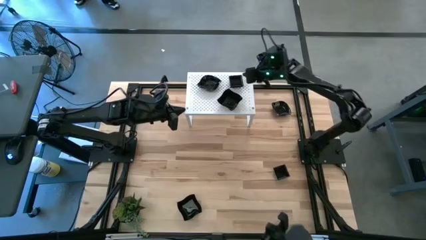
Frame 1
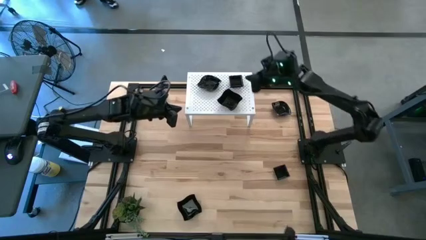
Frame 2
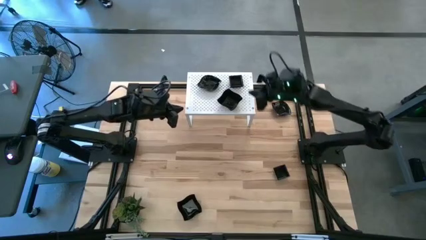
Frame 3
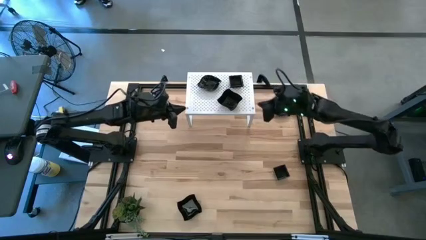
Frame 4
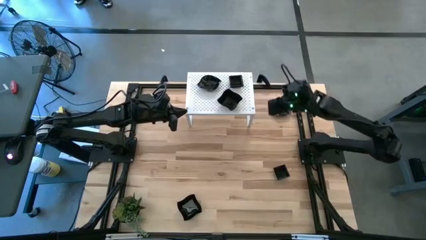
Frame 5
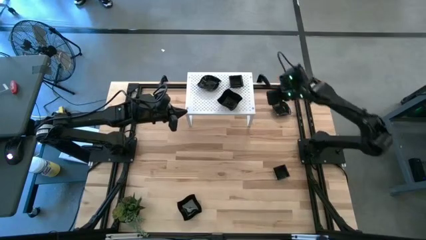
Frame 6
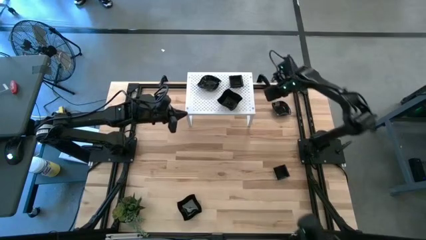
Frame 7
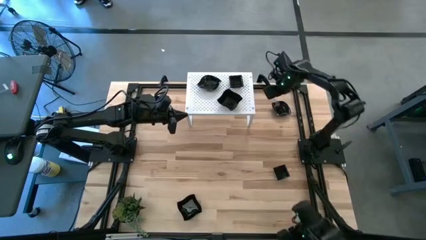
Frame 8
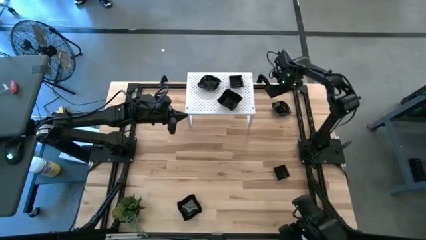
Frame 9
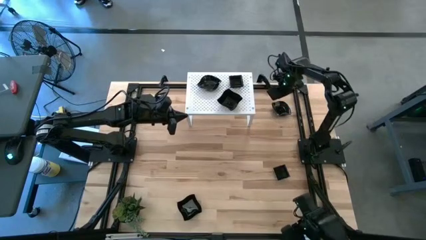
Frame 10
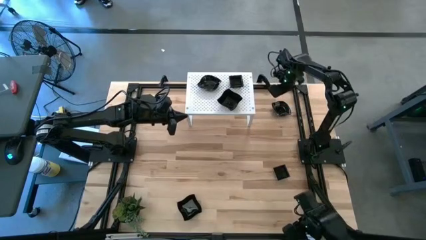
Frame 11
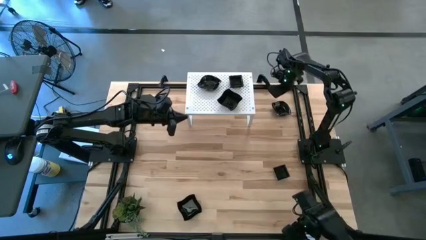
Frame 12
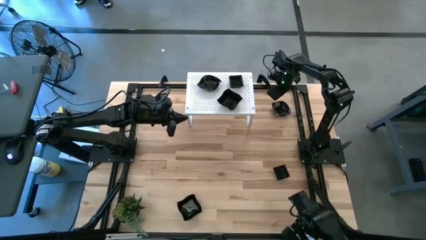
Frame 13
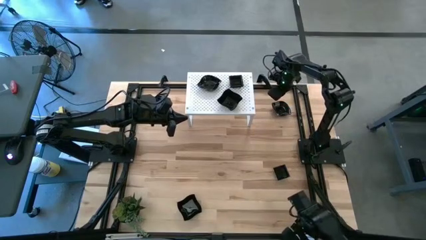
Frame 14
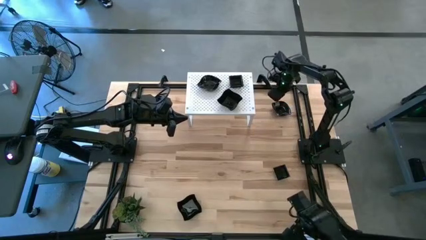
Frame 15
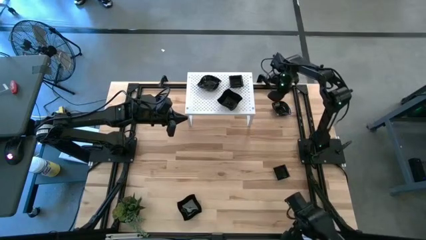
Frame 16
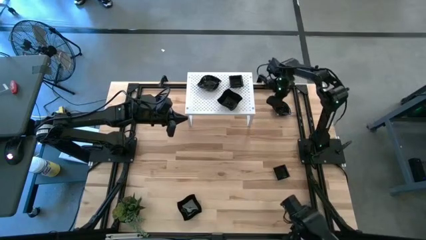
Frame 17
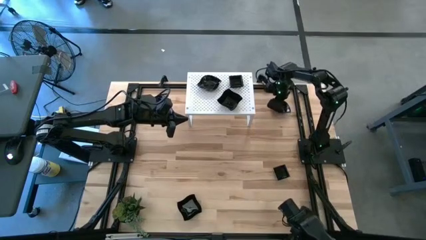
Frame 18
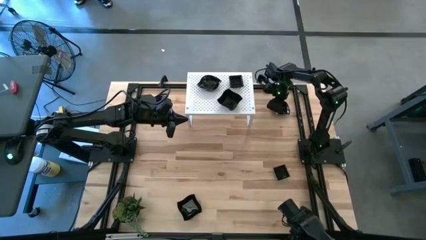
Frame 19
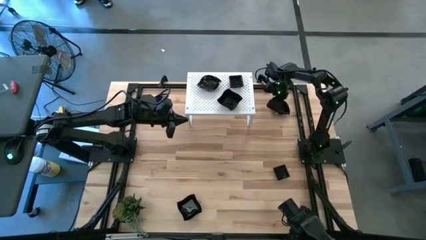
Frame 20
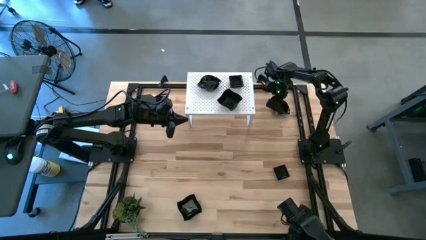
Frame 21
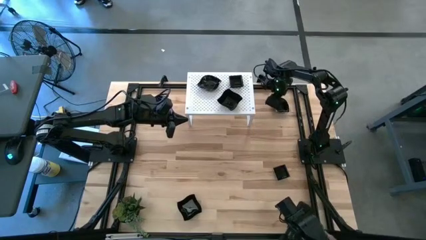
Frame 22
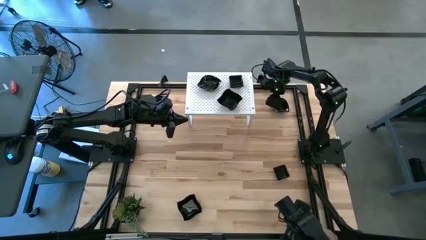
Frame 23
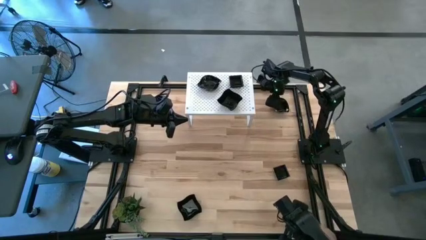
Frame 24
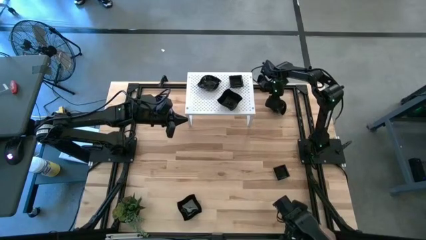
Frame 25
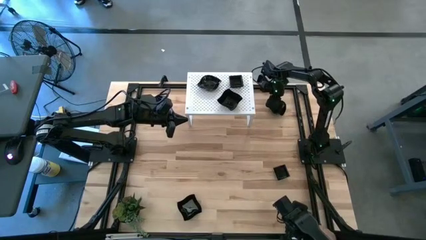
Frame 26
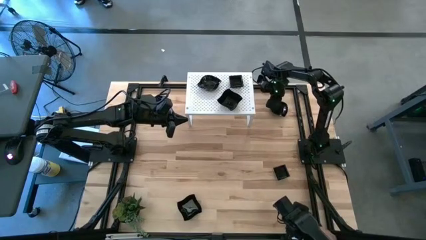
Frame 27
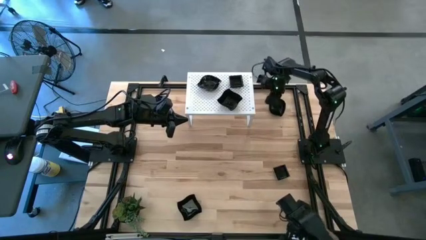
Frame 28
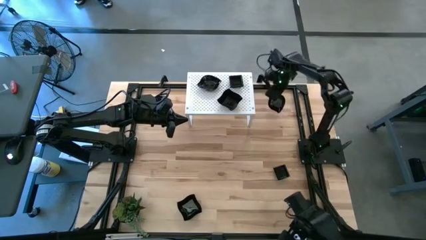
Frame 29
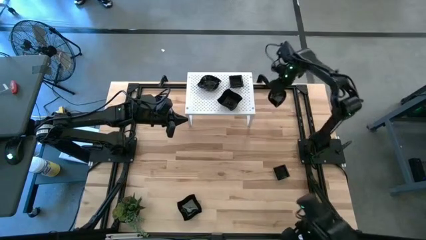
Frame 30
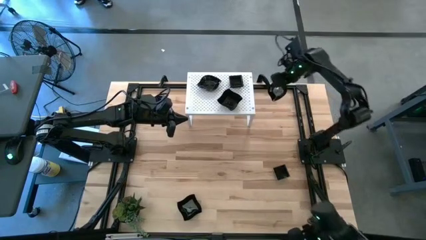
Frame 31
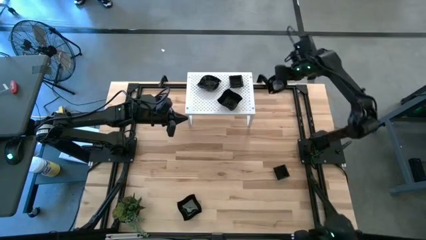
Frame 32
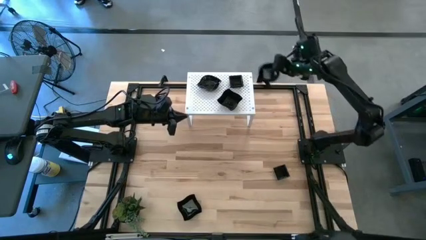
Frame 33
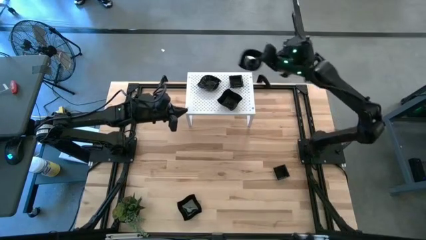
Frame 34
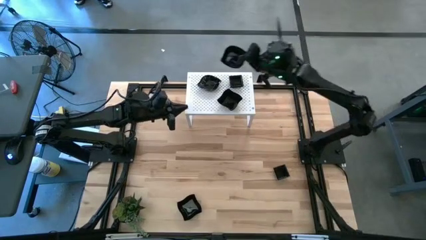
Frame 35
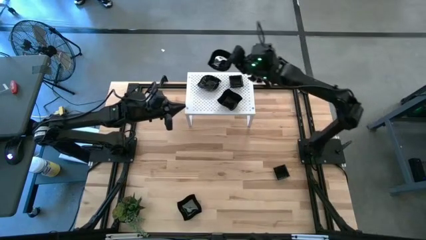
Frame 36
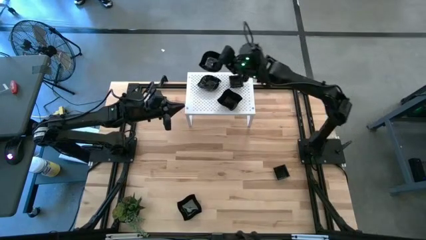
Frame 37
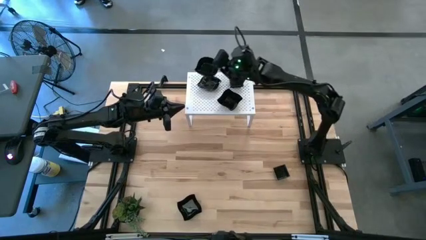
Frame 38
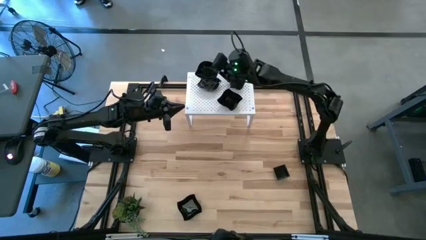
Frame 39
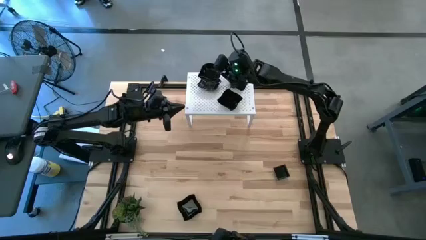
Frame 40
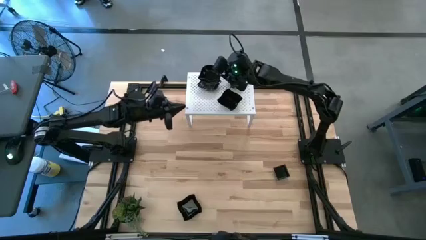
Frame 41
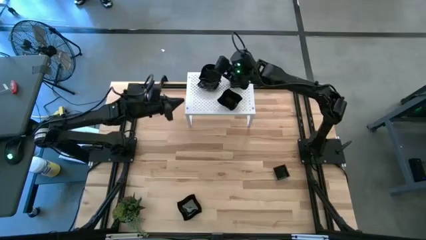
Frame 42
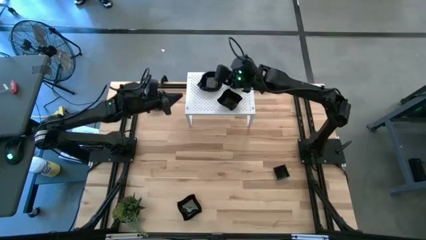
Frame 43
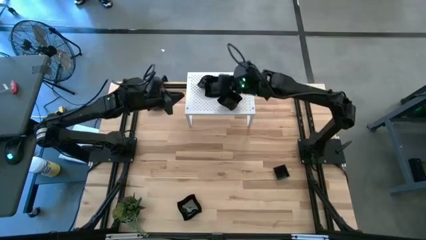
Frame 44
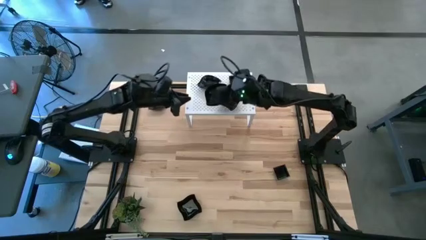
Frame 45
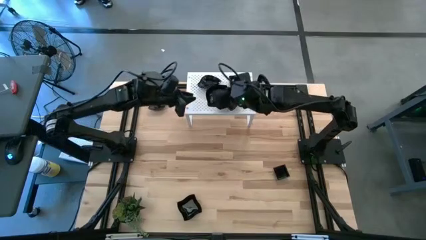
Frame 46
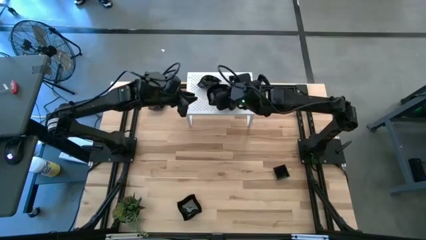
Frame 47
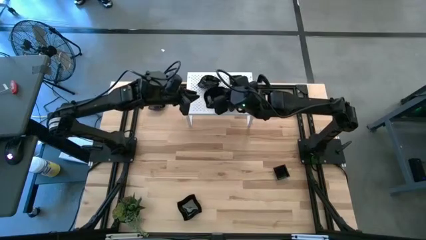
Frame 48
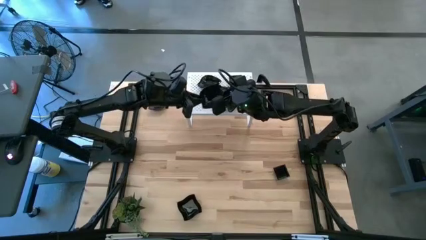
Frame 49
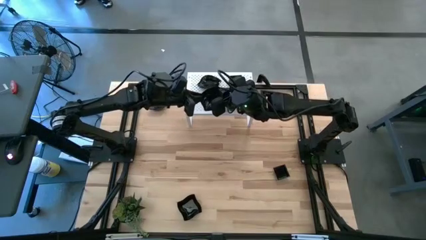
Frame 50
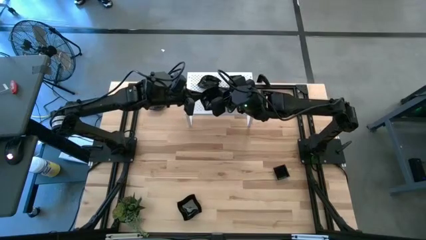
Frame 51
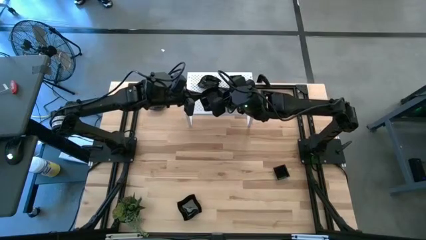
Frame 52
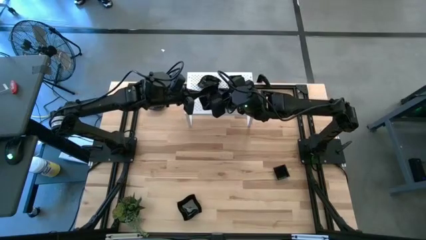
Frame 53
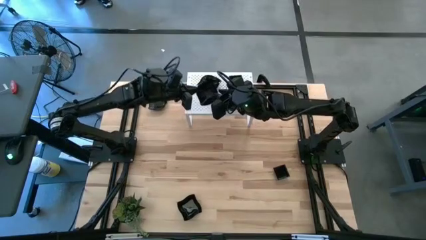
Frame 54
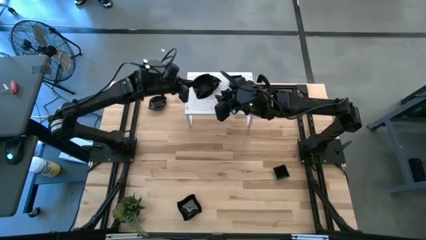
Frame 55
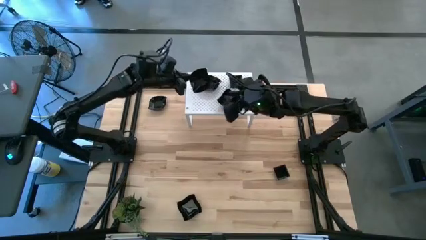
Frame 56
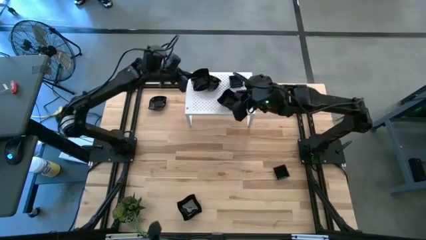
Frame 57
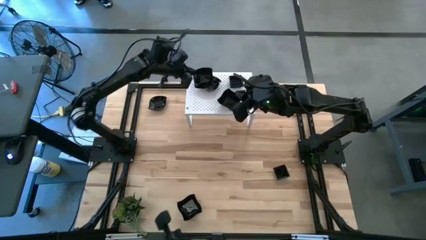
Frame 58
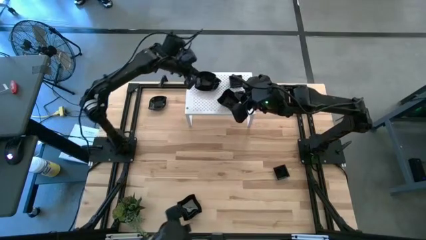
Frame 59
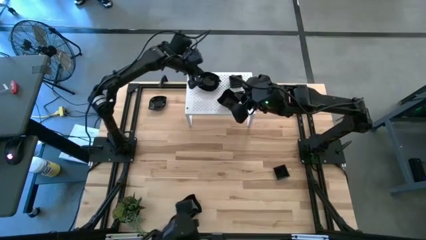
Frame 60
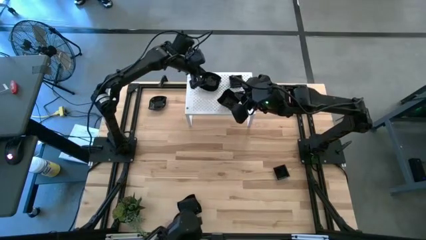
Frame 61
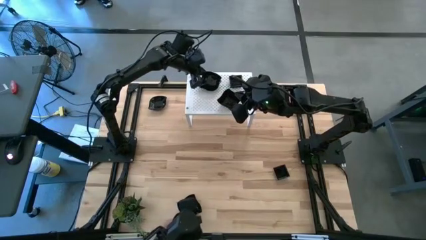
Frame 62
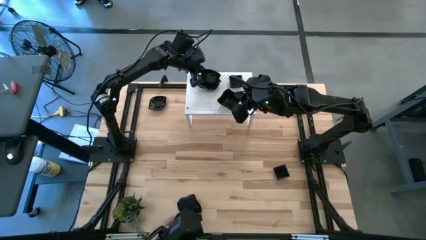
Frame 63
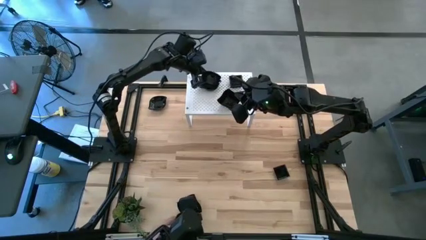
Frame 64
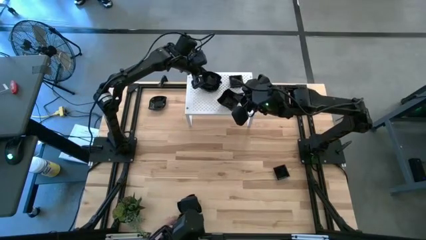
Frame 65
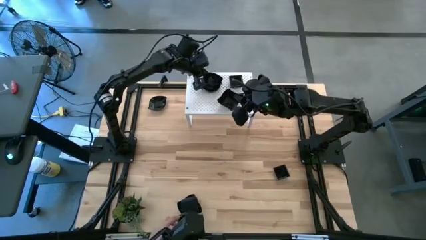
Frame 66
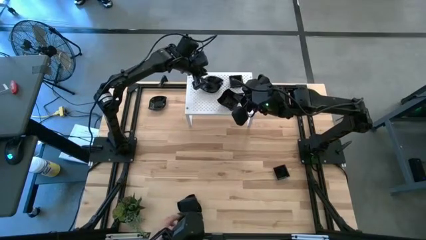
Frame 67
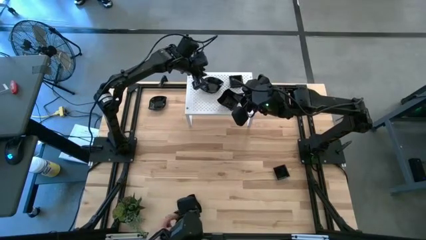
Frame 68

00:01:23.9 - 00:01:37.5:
Task: Pick & Place Mini shaped plates
Stack the leaf-shaped plate on top of the stacked leaf-shaped plate on the shelf

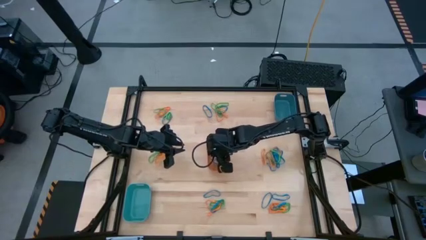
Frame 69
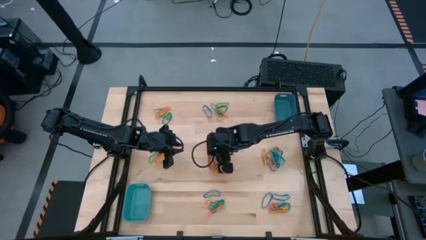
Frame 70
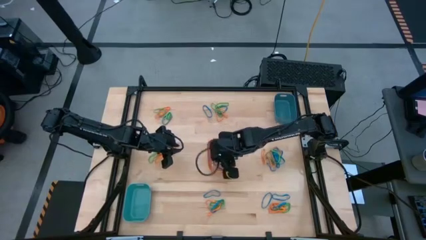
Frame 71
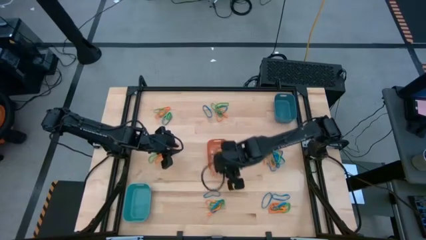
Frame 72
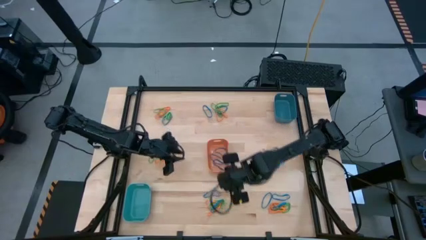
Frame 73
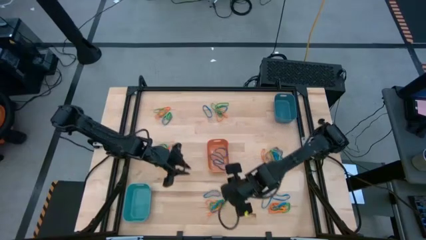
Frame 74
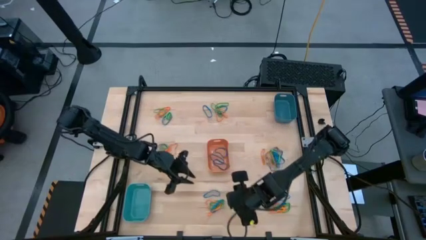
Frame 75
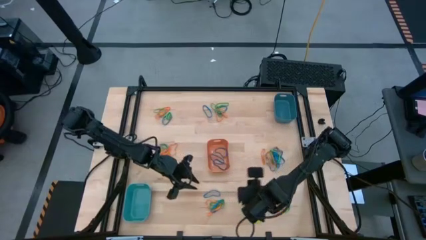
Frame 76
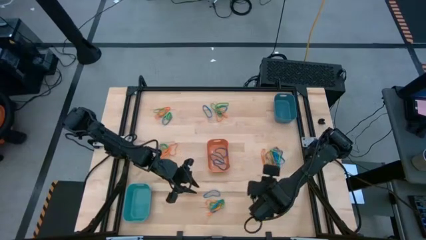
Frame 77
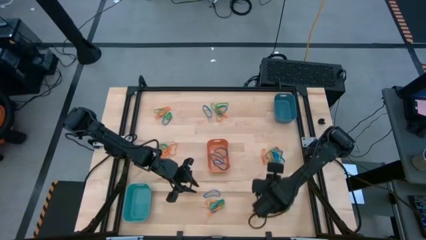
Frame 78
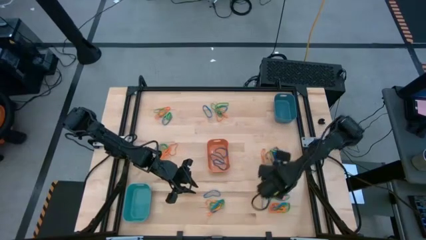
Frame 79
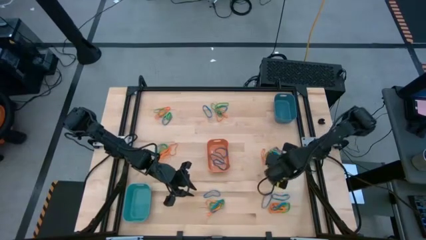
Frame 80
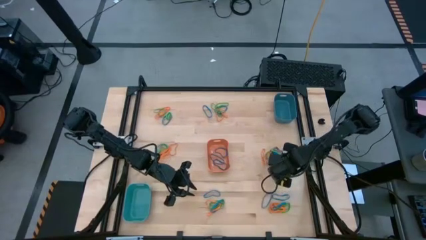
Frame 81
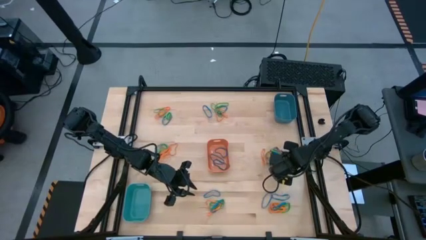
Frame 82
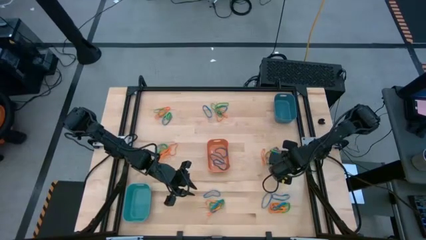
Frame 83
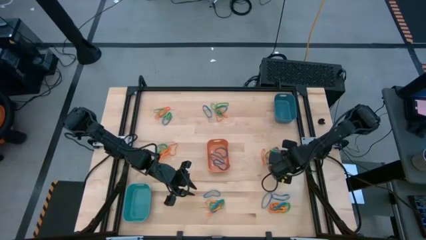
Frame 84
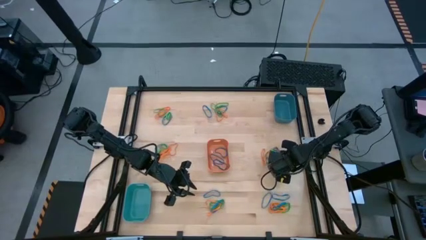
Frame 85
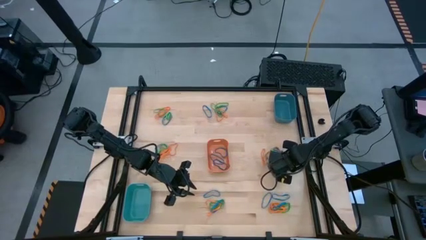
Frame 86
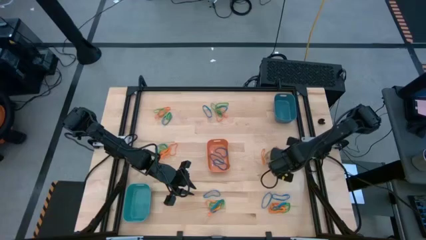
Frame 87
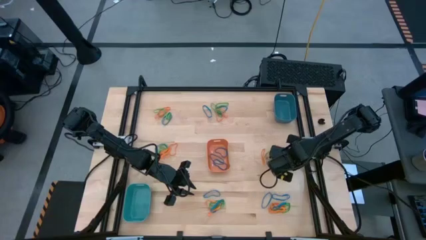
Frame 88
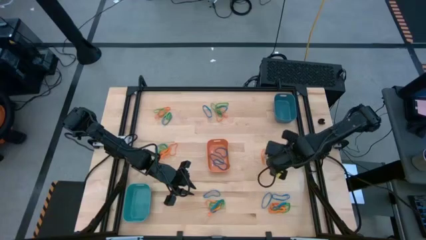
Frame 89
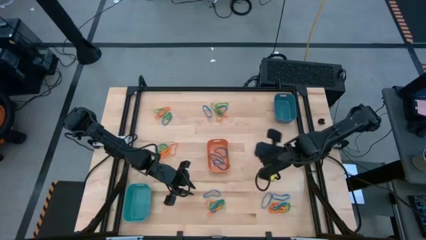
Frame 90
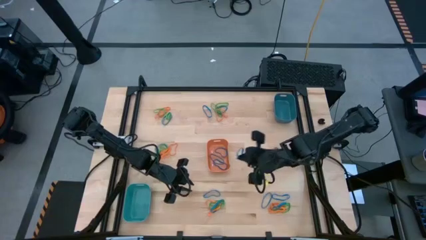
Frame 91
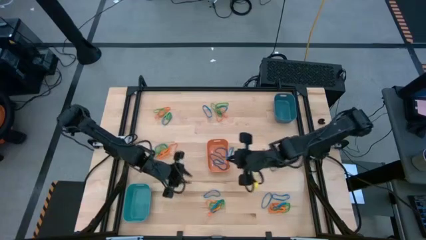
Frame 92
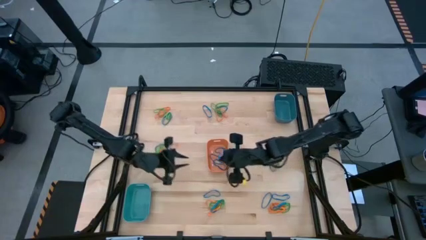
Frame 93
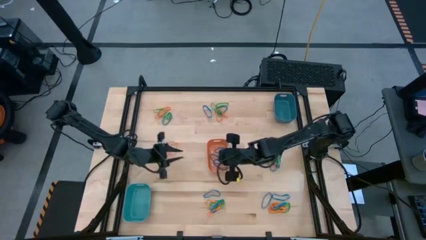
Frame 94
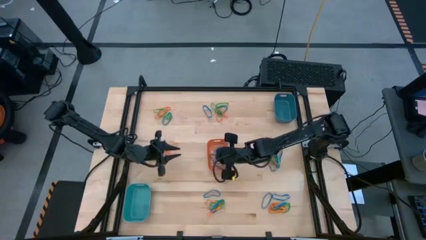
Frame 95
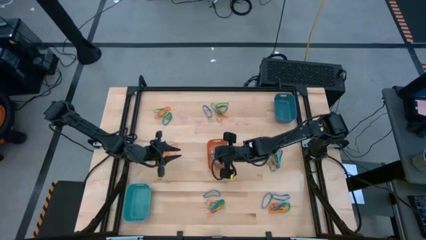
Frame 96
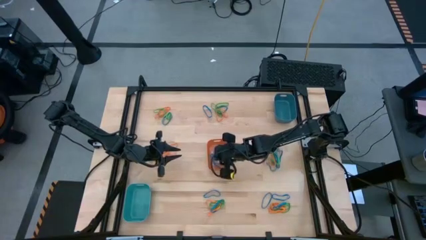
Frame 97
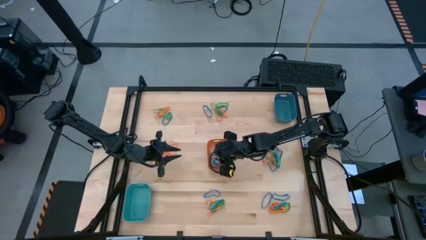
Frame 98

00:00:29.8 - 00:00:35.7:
Task: Sort rubber bands into baskets
Put the blue rubber band into the orange bin
